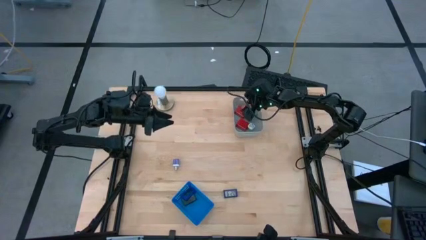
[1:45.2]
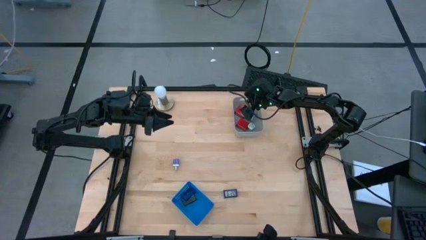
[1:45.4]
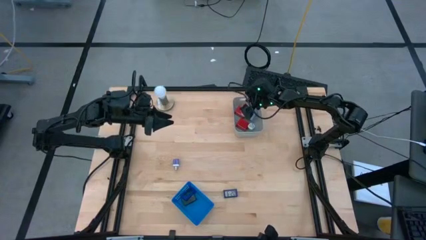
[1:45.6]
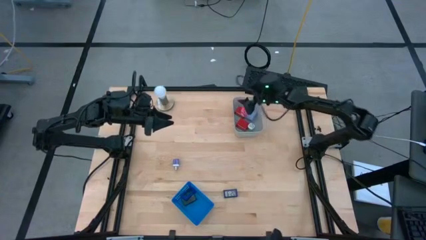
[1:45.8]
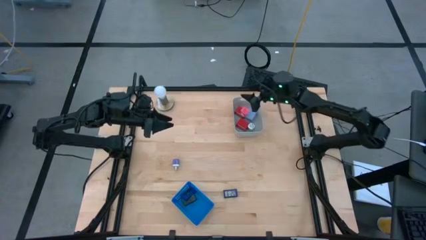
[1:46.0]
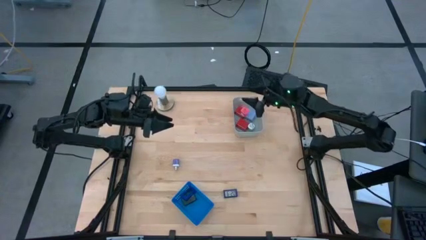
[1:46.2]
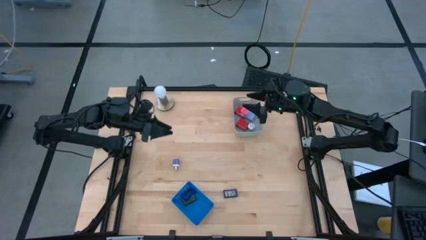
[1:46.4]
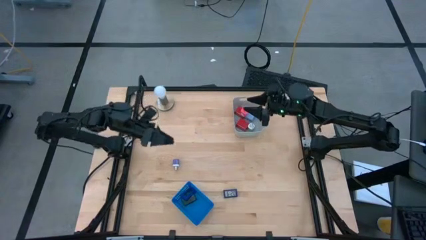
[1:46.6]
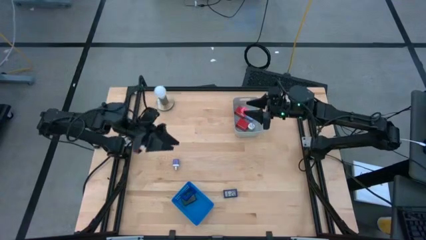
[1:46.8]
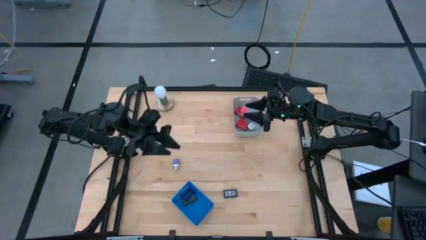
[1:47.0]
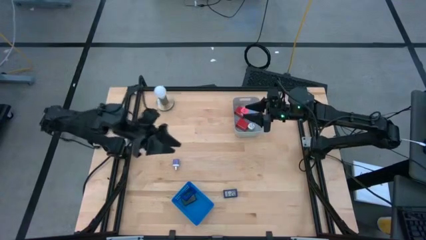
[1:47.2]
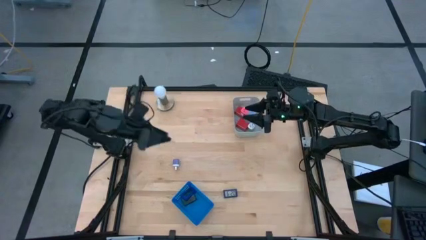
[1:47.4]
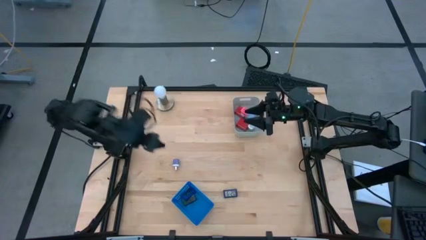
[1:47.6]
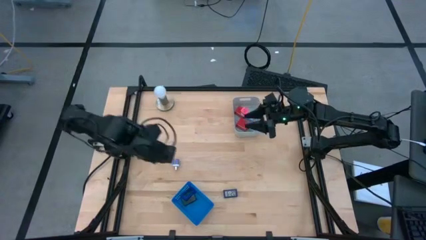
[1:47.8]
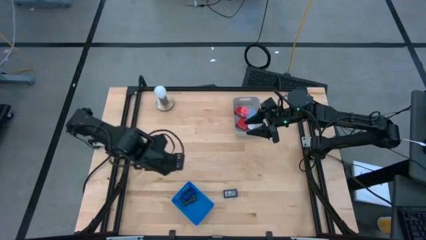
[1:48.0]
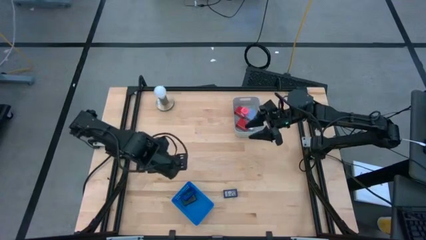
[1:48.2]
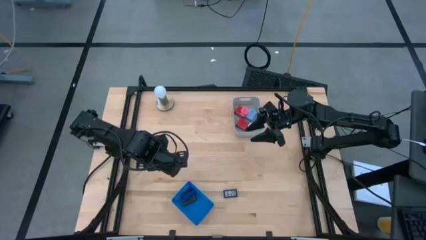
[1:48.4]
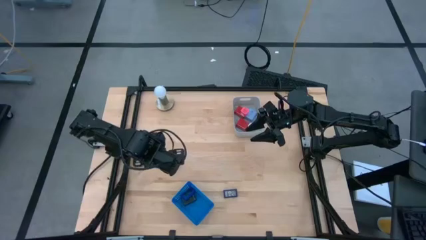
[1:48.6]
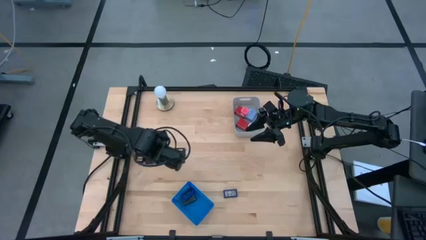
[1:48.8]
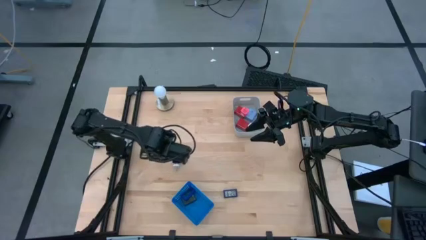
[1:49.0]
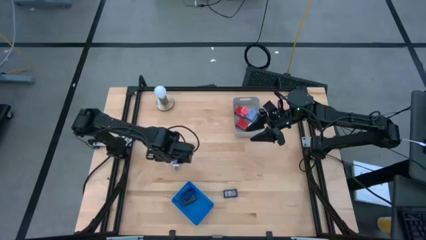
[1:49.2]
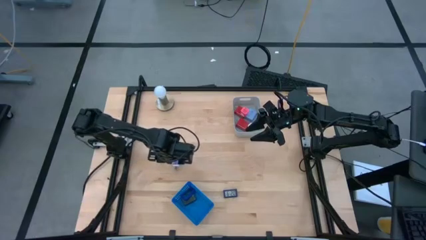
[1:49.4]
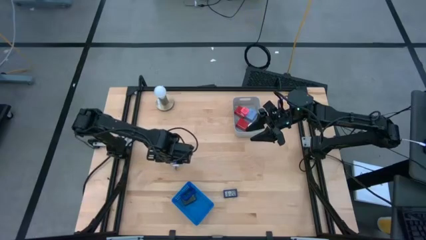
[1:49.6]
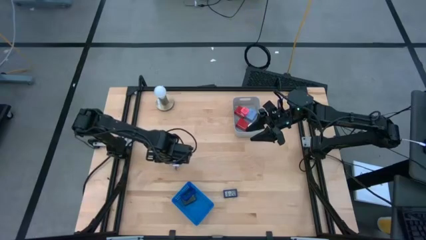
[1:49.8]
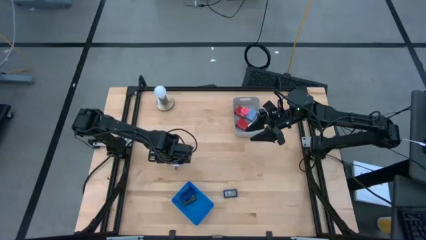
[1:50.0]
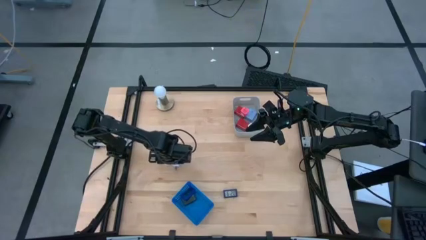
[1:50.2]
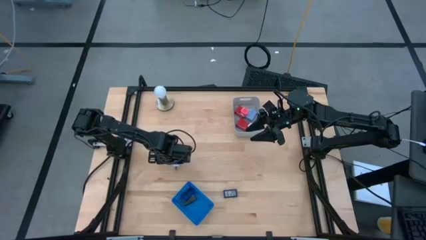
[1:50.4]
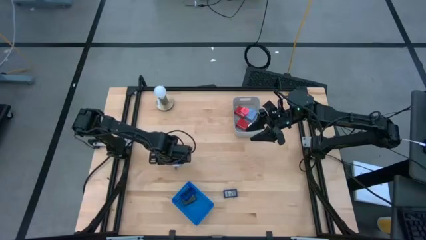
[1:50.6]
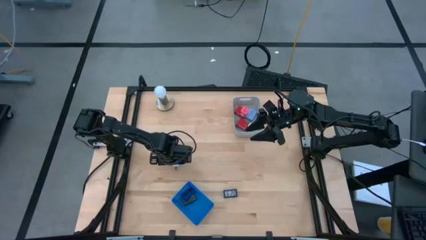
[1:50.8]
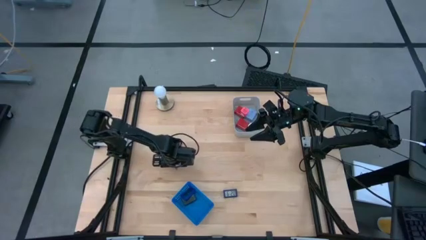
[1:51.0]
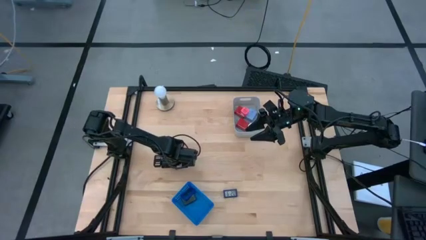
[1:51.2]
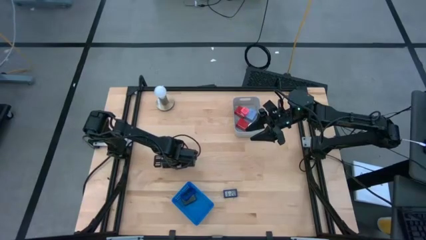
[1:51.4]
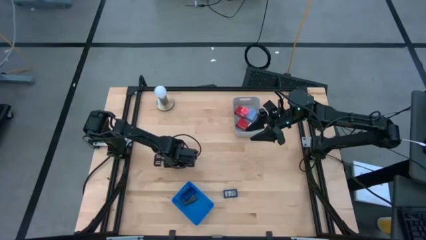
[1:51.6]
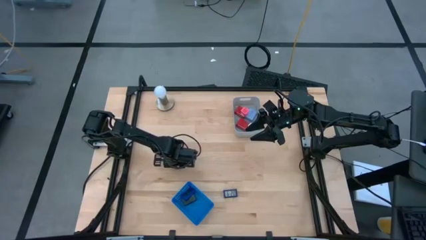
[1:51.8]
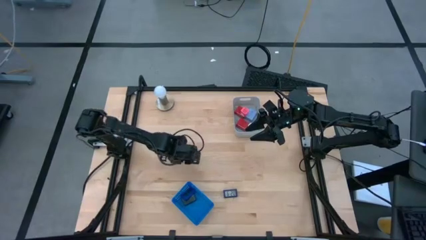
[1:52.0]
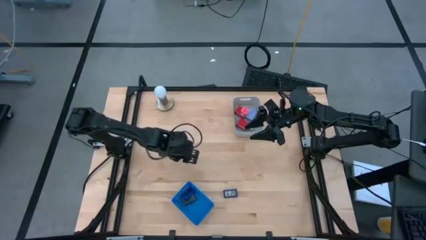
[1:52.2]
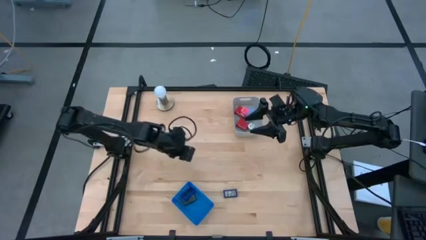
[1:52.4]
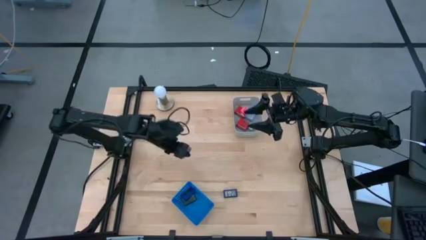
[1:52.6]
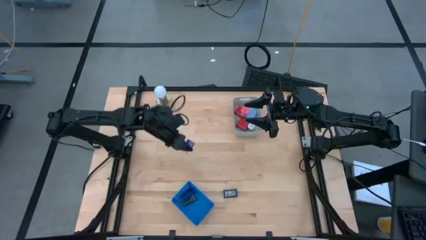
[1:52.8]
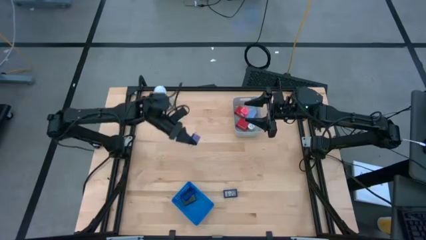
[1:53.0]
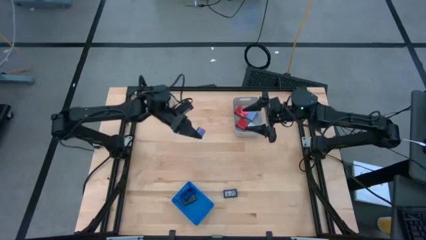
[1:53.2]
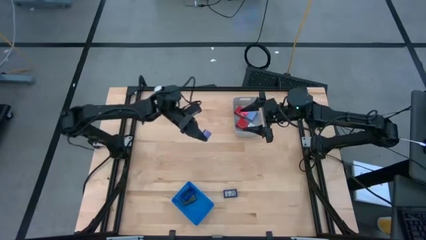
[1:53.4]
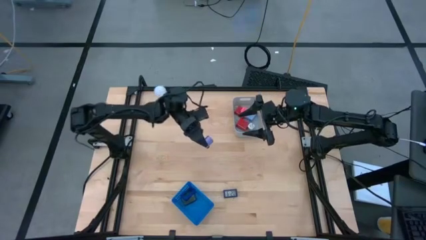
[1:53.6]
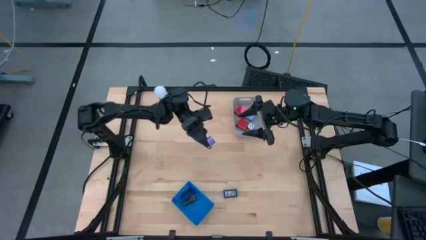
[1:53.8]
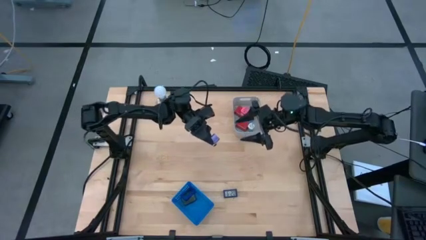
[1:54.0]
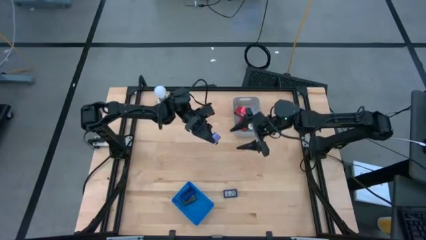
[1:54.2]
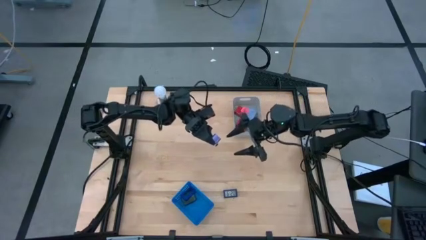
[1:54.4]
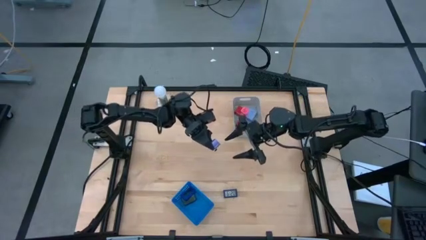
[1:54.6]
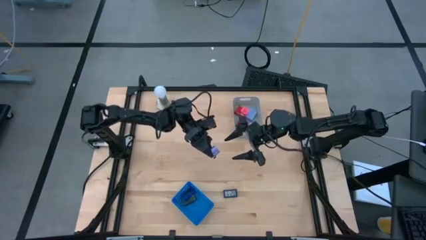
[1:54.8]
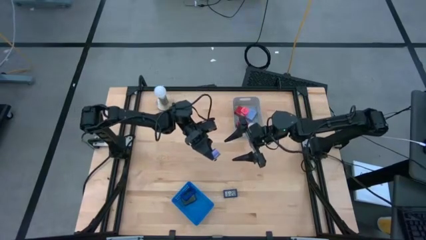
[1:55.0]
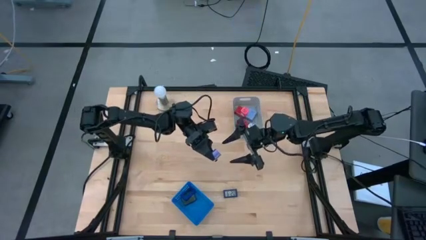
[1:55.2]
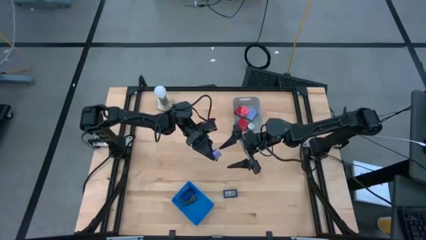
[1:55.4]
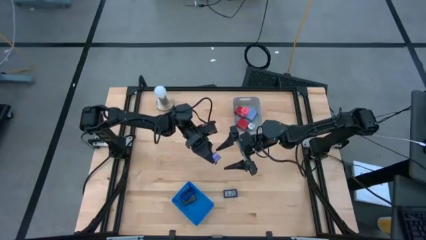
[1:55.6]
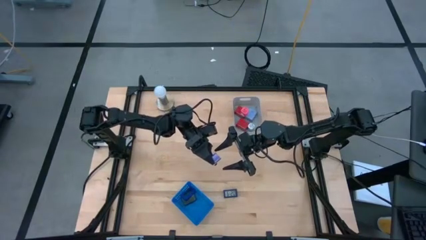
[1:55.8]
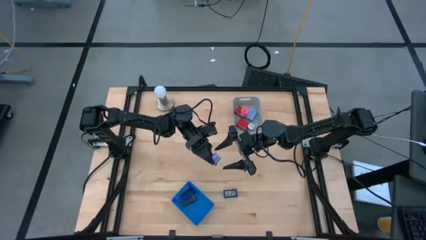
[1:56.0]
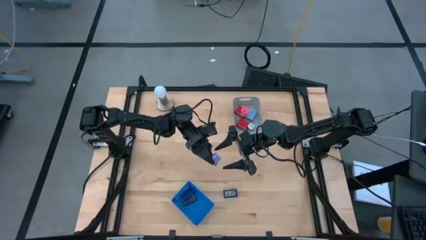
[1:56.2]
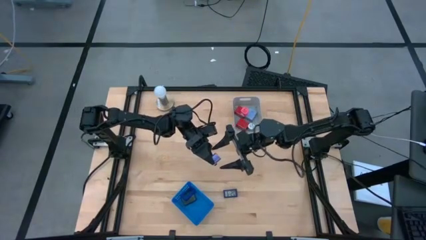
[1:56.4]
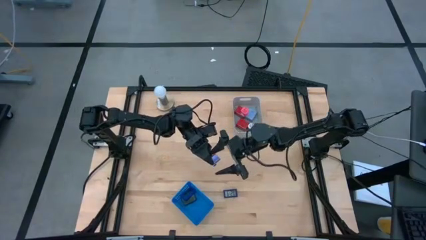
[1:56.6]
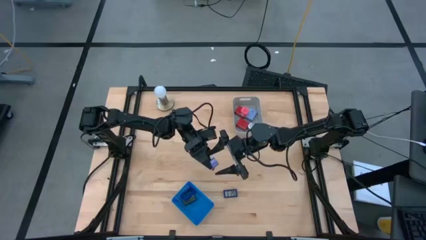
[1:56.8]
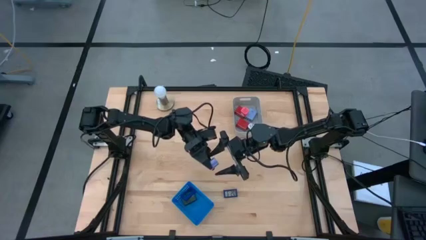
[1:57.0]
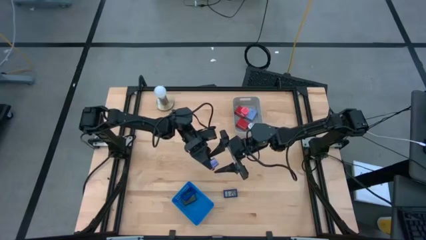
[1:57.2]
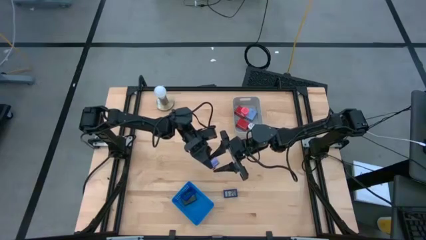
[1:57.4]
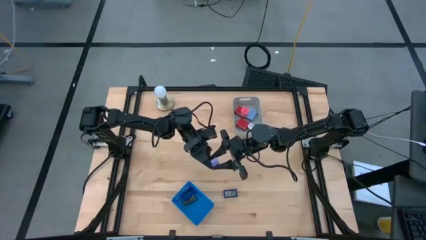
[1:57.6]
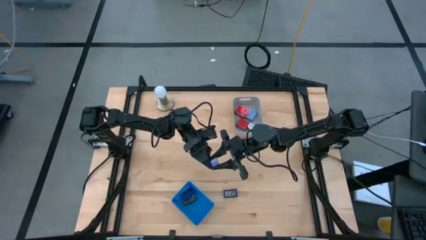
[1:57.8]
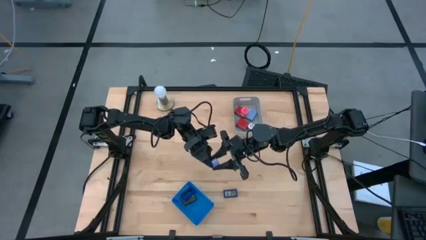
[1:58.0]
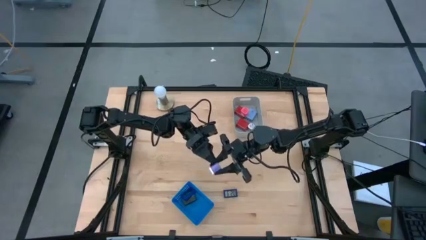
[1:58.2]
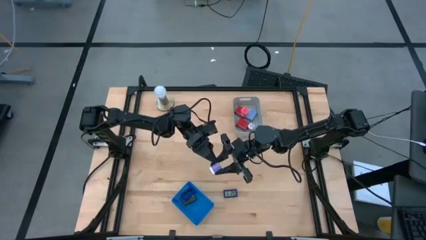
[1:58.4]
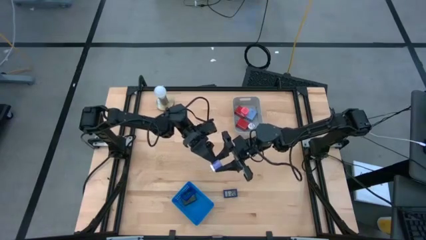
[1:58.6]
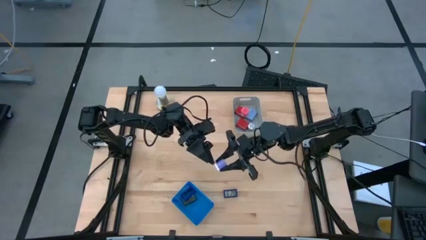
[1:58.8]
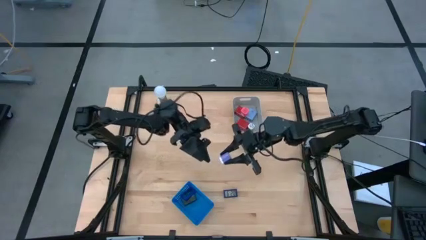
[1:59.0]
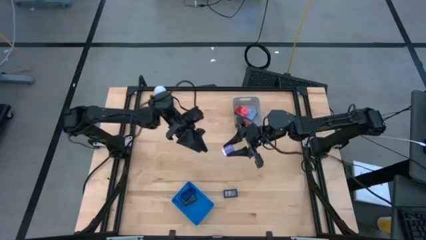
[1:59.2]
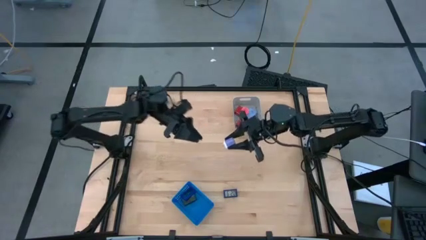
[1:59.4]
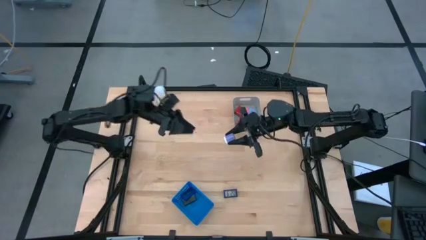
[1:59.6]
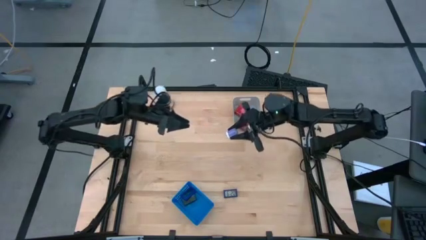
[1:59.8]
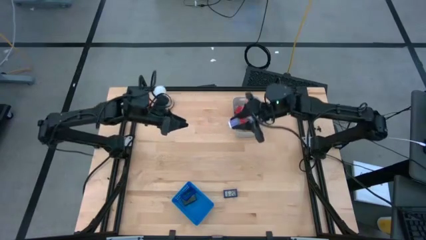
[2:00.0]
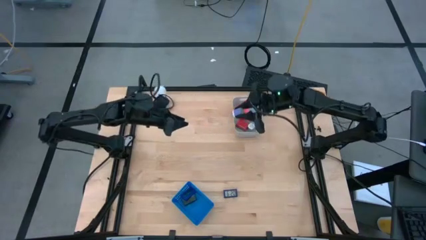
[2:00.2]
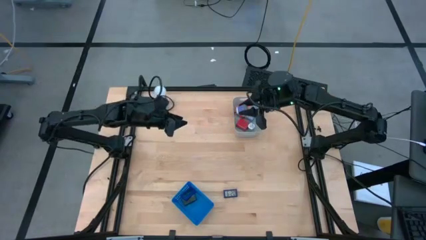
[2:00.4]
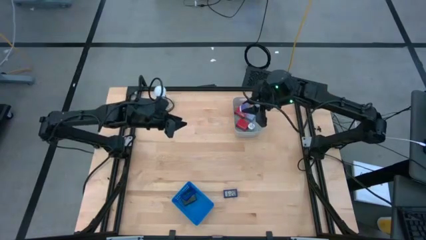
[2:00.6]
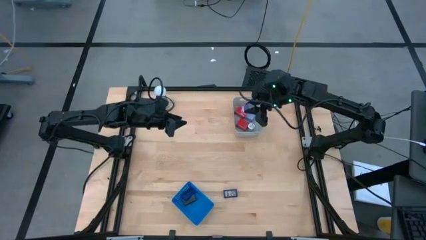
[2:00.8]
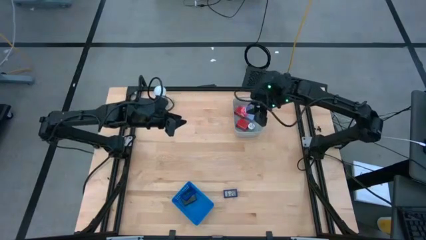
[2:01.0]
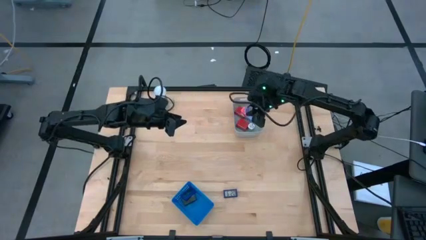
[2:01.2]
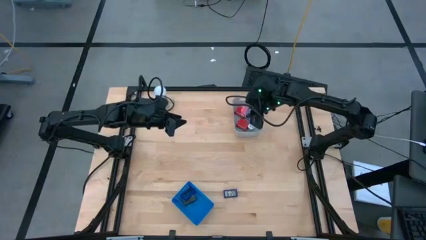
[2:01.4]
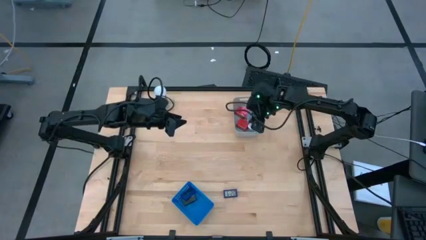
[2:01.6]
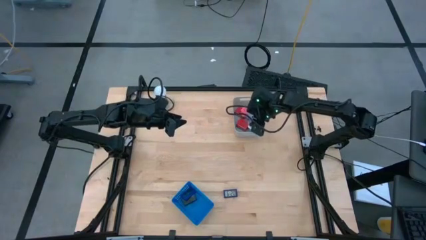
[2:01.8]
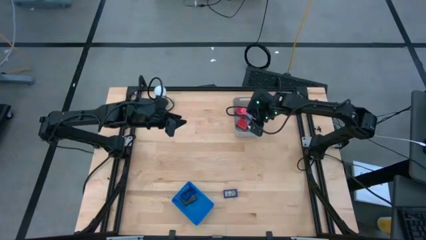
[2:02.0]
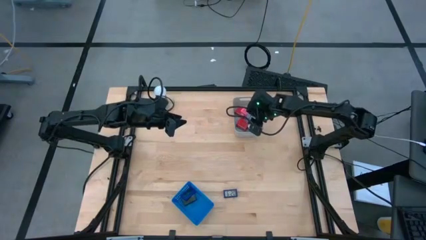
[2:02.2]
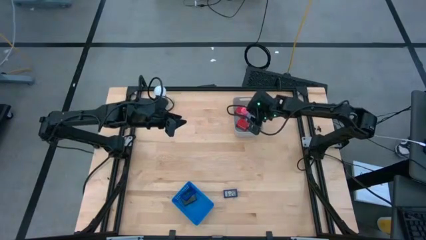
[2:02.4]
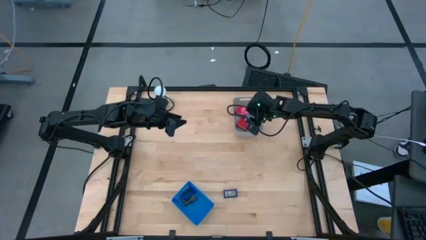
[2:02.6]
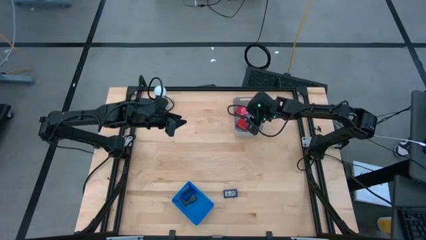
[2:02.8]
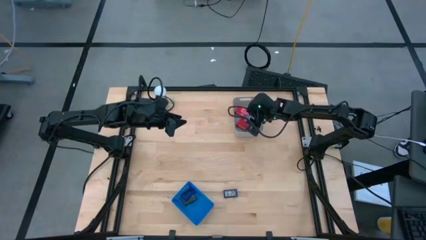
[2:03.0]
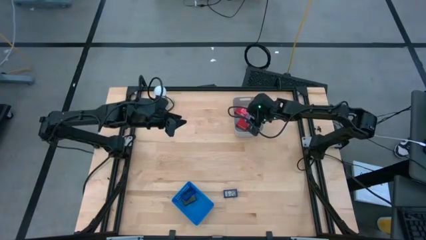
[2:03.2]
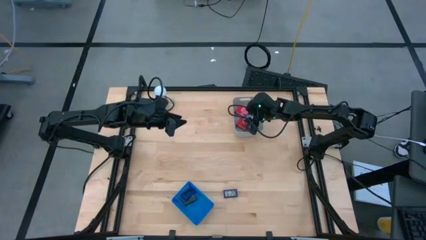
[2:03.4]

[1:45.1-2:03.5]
Task: Pick & Place Office items
Put the violet charger adapter into the gray bin
